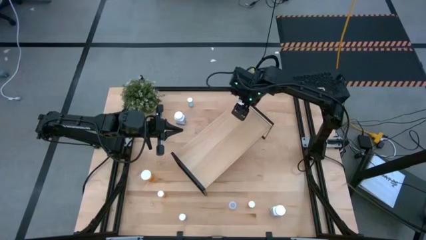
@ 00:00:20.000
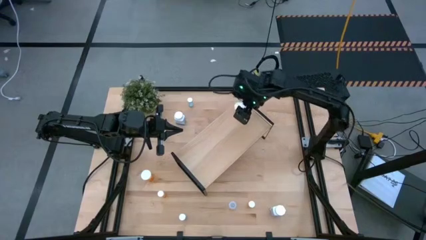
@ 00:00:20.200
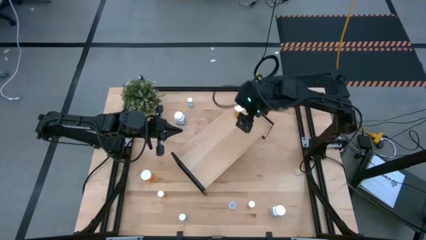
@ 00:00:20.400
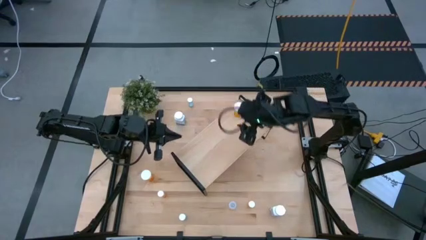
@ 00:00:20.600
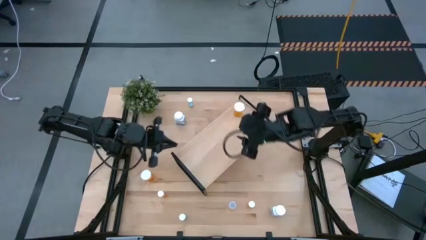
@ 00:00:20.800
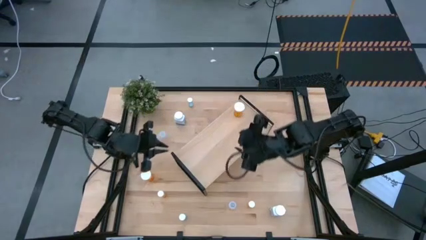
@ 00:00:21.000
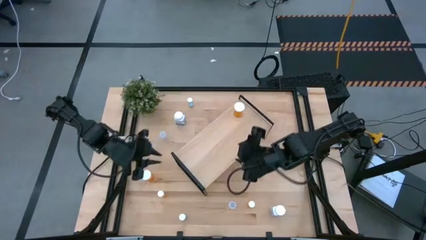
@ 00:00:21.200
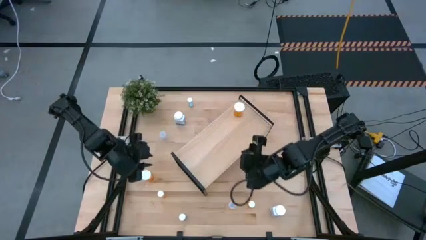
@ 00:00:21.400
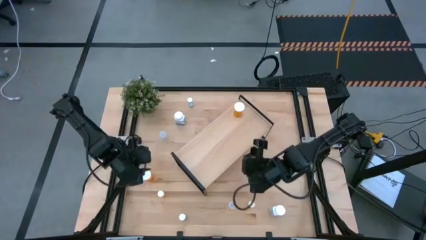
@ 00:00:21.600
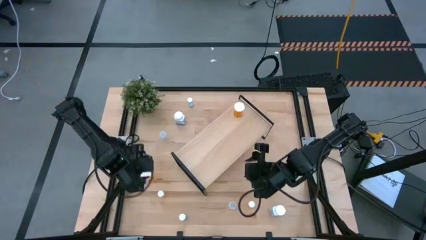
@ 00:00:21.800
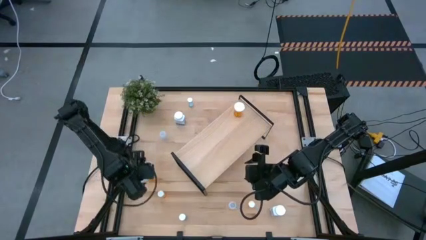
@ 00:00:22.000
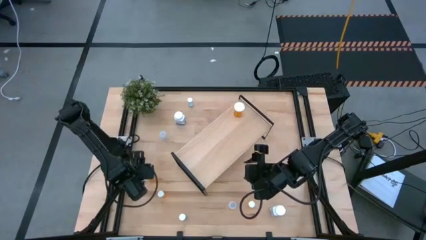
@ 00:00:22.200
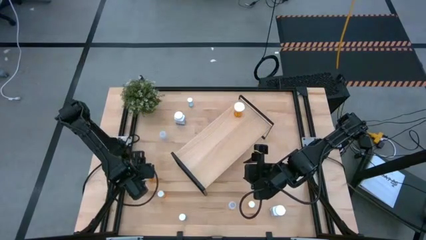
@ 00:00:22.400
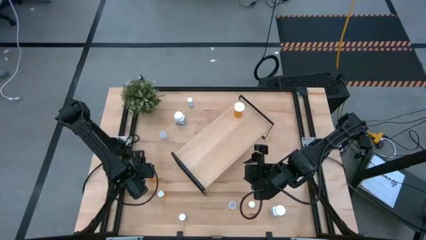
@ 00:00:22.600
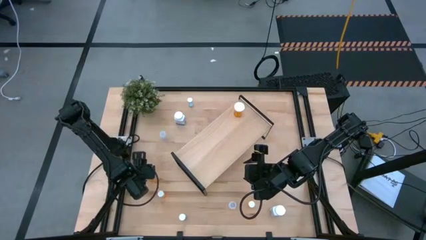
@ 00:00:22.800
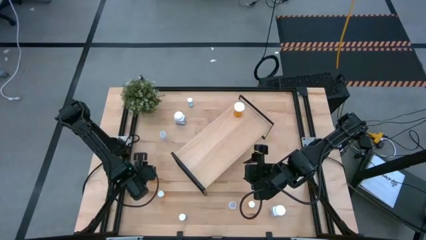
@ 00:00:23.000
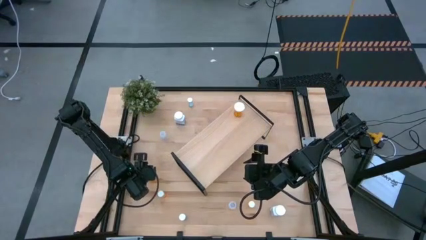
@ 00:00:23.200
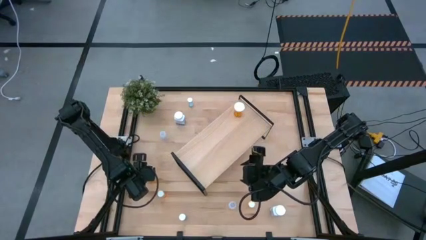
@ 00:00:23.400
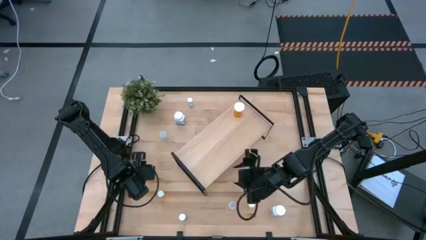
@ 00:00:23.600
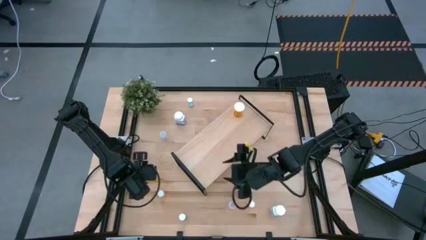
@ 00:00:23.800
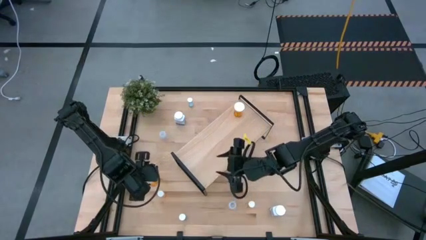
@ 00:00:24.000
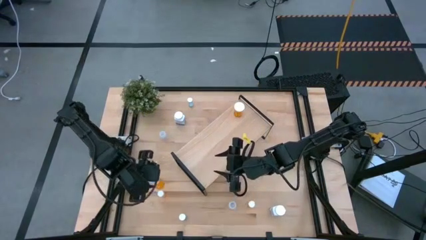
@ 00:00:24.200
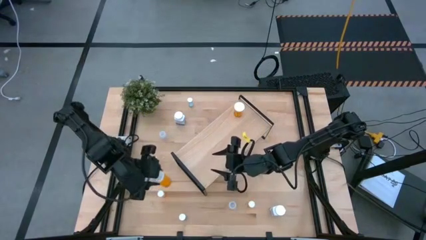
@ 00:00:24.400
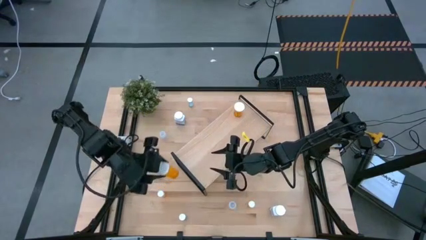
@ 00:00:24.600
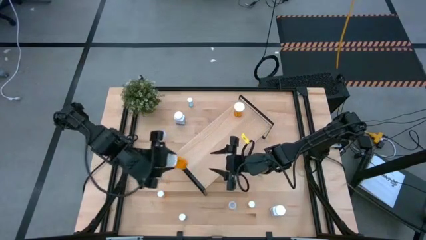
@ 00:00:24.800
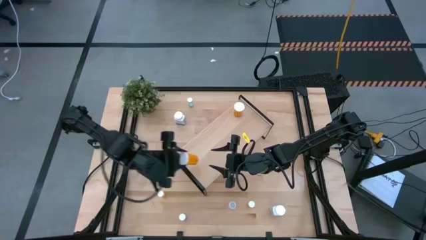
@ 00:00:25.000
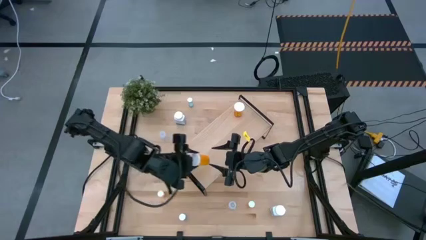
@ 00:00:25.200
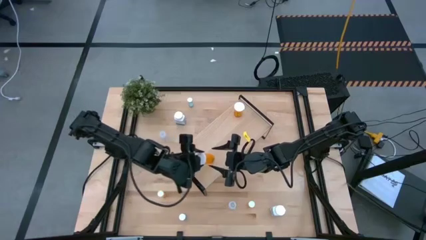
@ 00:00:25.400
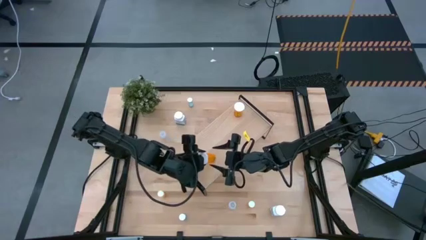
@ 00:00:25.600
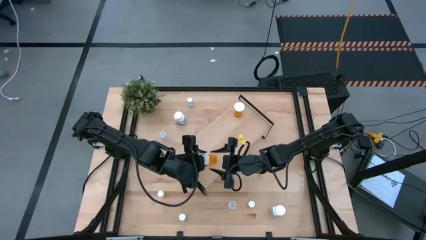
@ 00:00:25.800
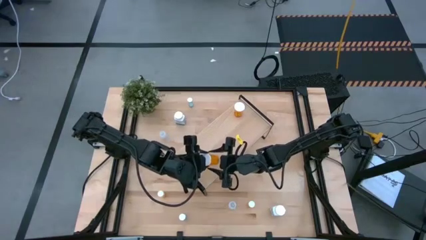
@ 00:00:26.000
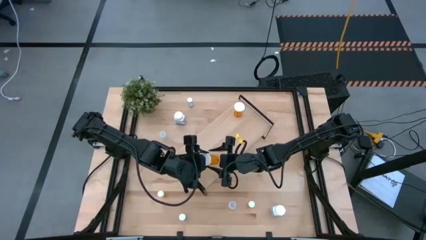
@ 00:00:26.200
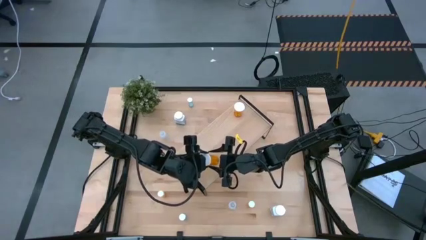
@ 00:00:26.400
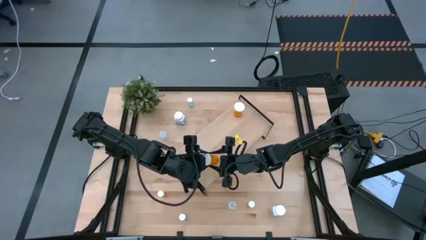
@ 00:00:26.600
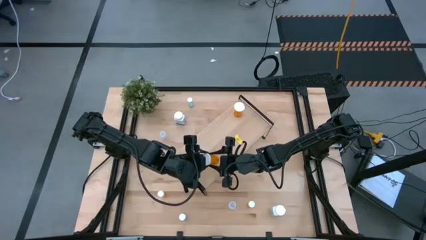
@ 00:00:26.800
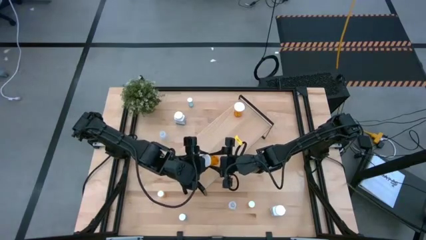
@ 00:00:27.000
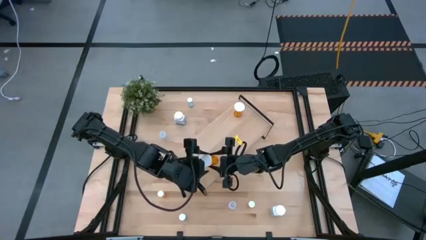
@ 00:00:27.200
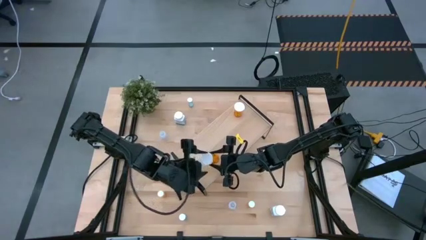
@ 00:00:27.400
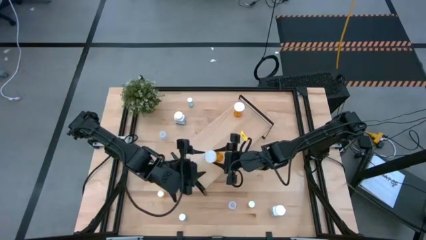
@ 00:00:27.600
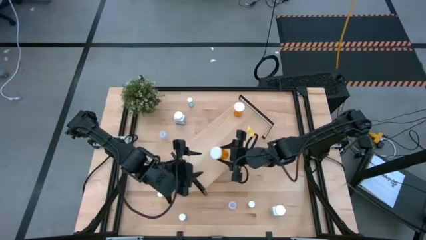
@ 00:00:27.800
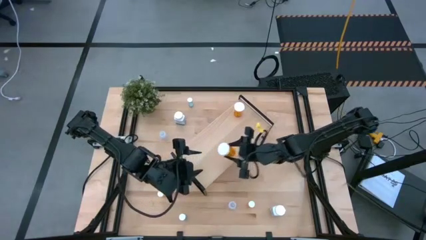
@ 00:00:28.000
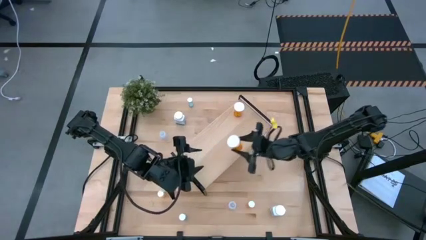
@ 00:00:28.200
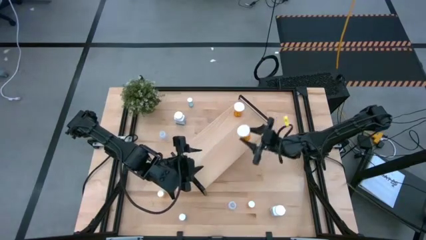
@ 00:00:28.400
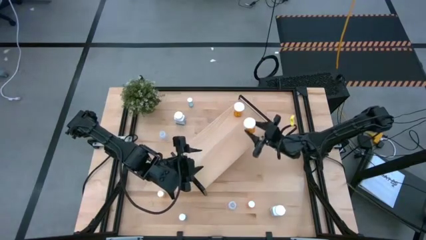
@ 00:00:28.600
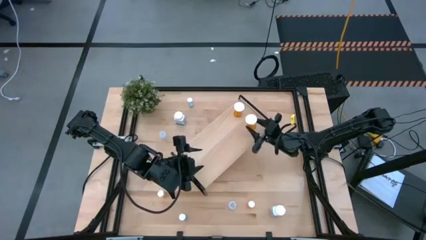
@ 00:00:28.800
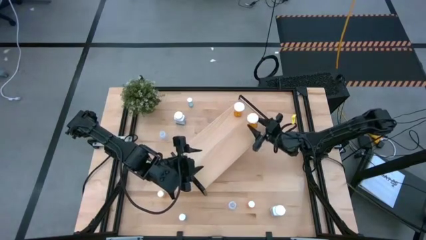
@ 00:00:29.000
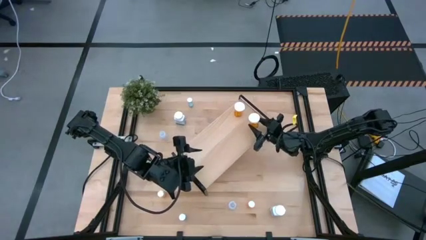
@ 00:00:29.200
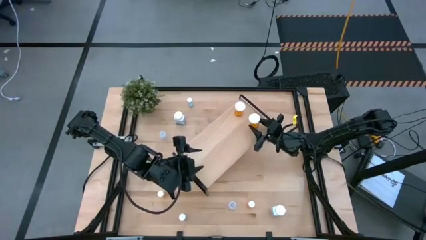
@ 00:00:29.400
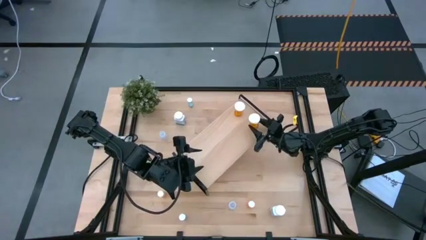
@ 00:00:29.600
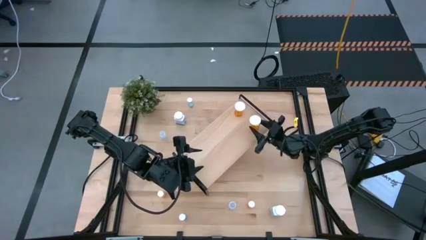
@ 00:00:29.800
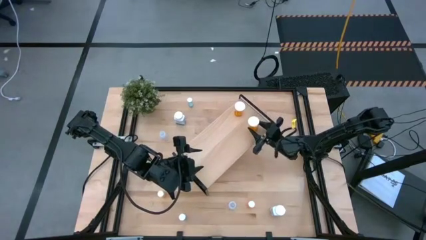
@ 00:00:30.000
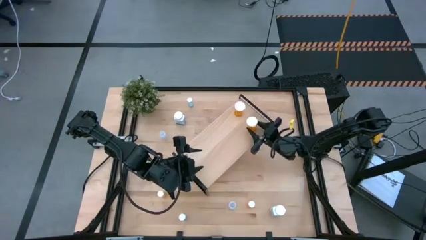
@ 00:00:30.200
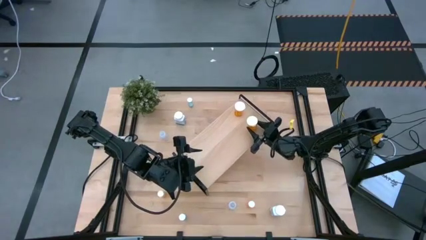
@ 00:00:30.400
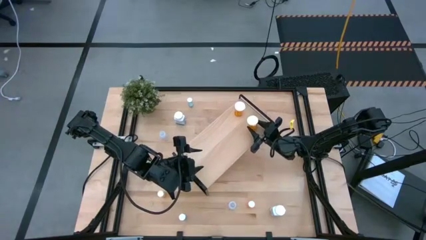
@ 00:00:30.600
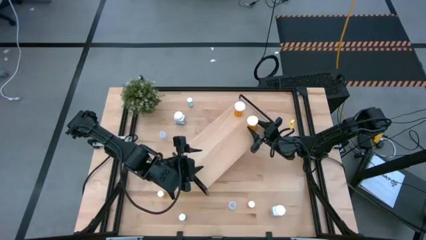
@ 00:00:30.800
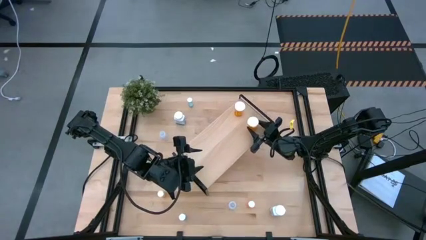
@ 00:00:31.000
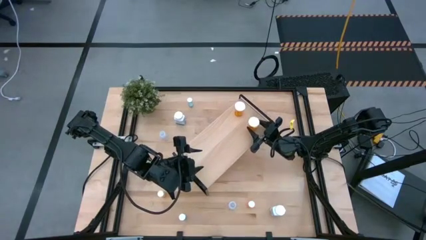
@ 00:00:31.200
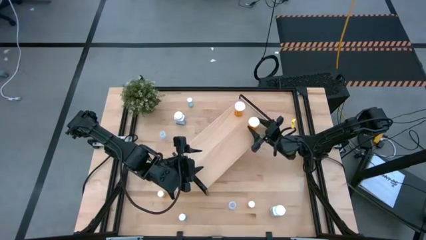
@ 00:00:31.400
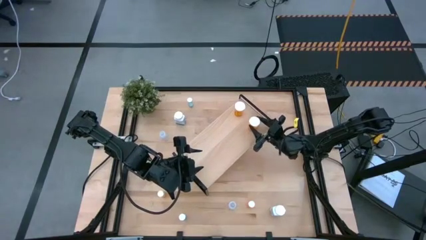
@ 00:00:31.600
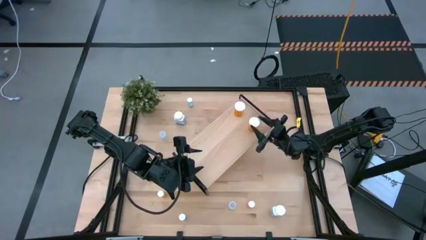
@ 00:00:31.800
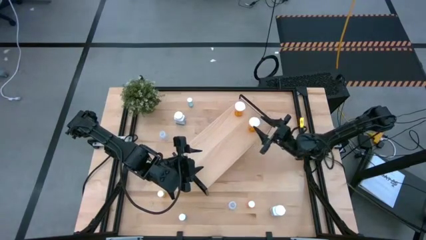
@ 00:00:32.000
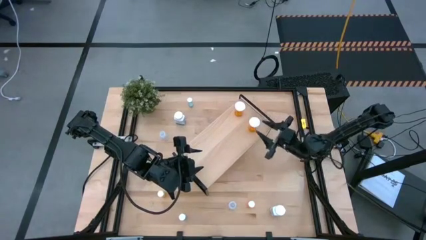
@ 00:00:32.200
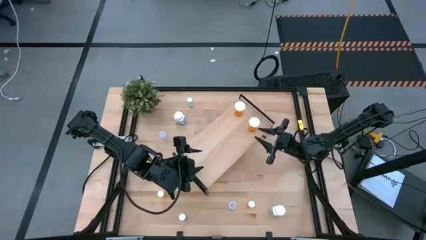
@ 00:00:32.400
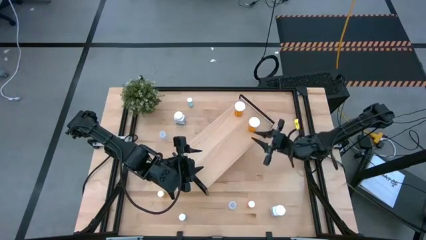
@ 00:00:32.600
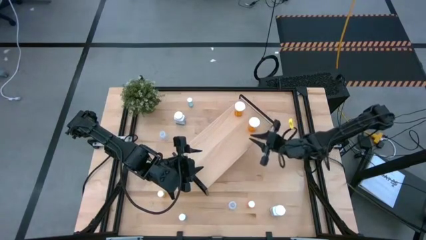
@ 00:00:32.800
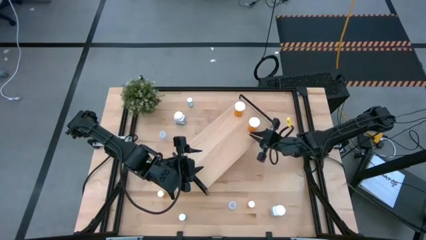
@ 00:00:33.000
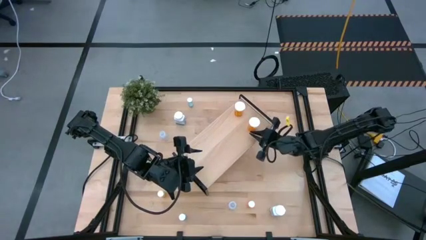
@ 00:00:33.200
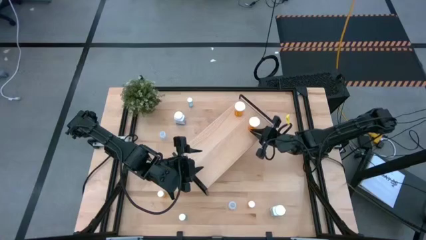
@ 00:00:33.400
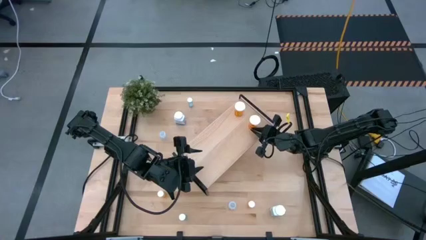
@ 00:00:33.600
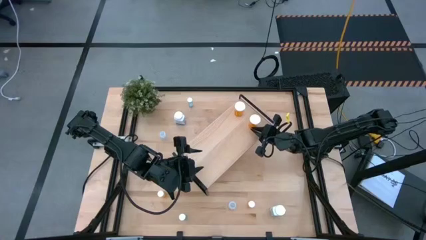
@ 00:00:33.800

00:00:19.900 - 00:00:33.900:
Task: Pick and place medicine bottles onto shelf by color
Put the large orange pill bottle on the shelf aligned with the other large orange pill bottle
